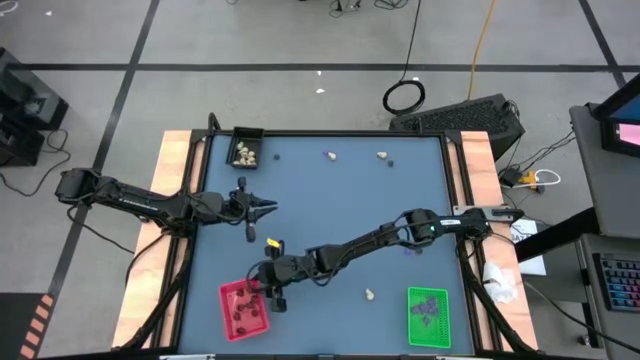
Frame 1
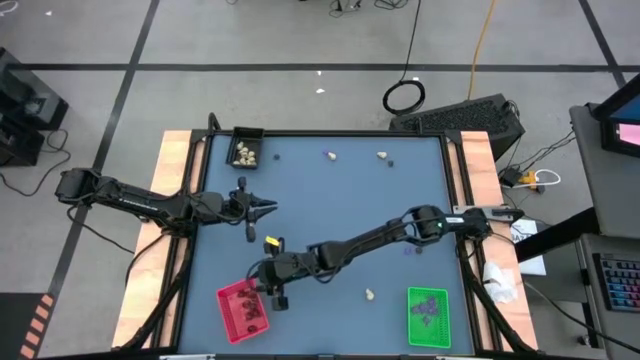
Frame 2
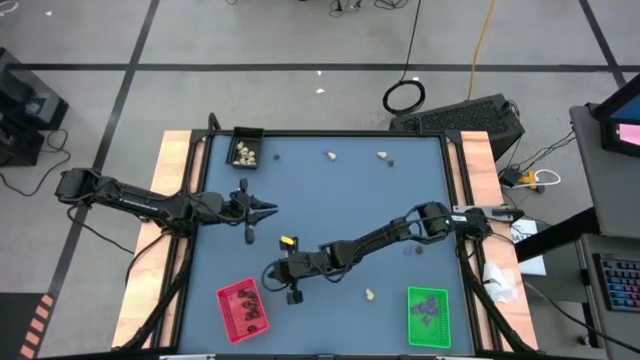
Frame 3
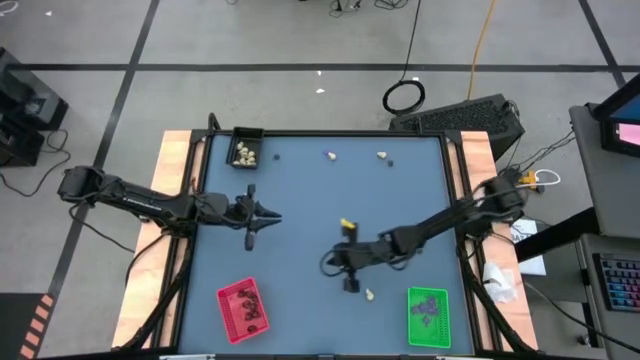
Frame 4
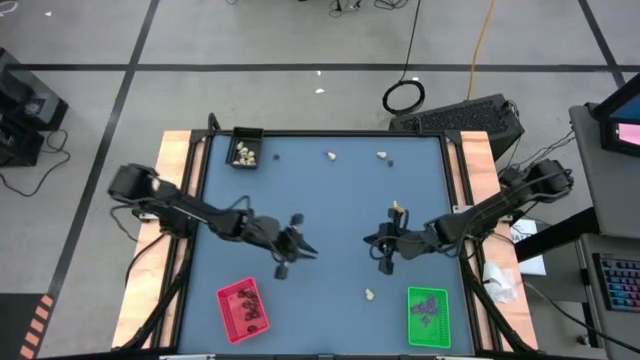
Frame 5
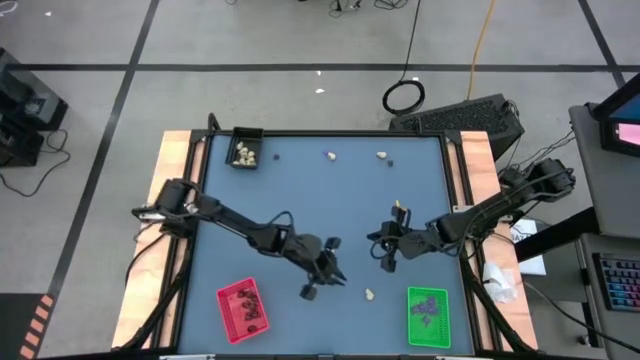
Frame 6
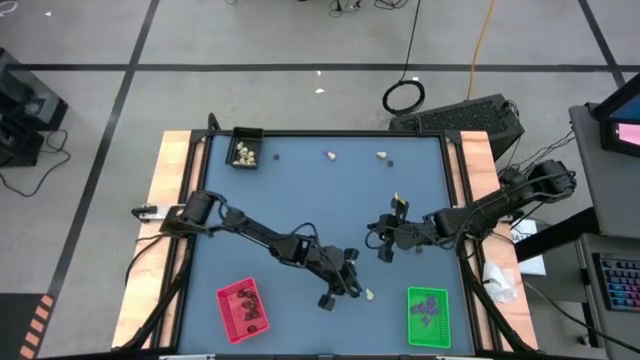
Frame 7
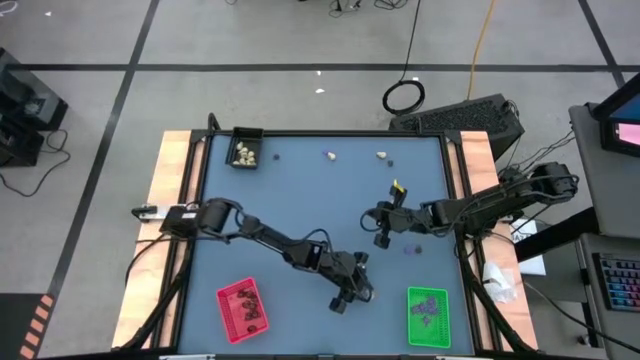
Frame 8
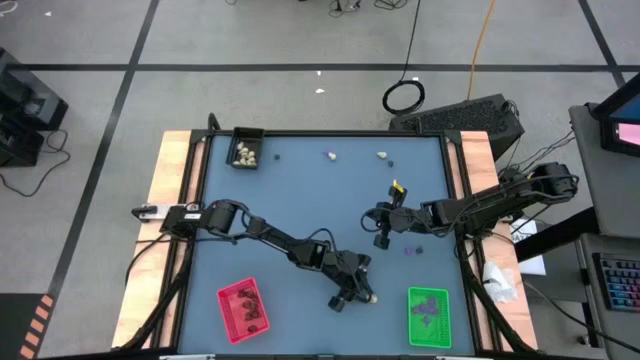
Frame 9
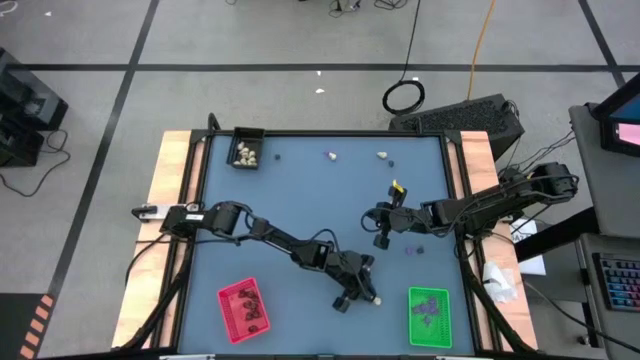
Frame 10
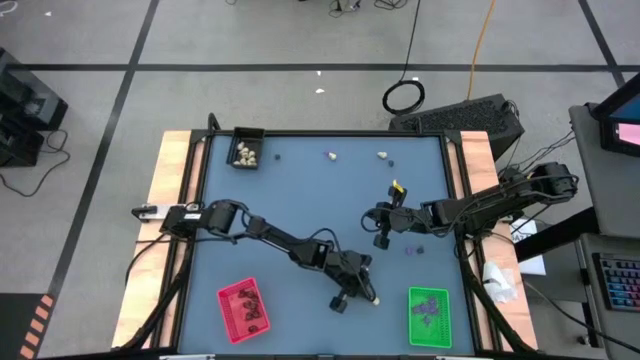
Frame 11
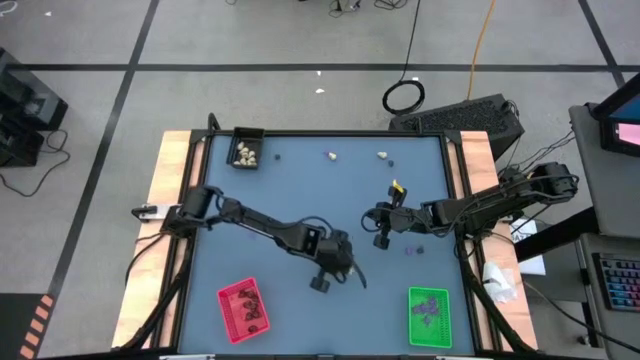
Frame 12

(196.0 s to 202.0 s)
Task: Sort Halloween decoration
Put the white skull toy into the black bin

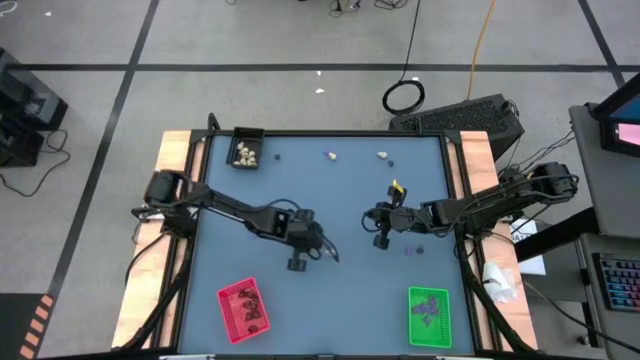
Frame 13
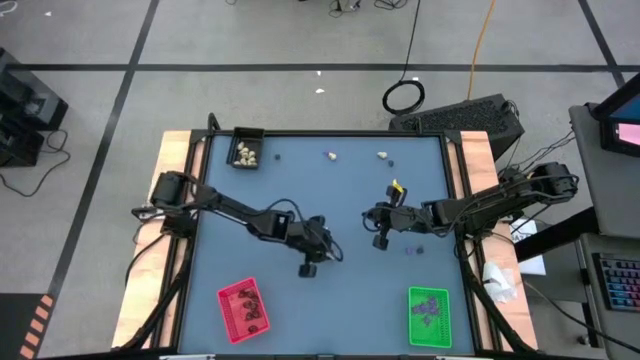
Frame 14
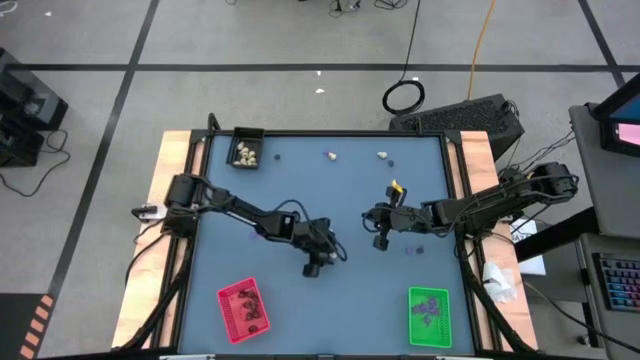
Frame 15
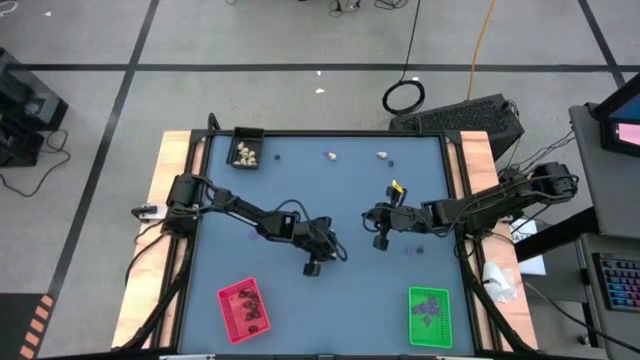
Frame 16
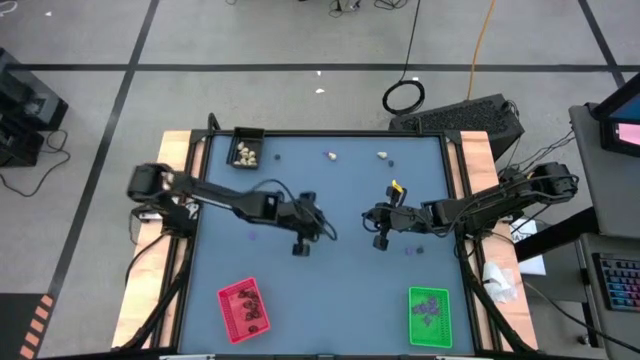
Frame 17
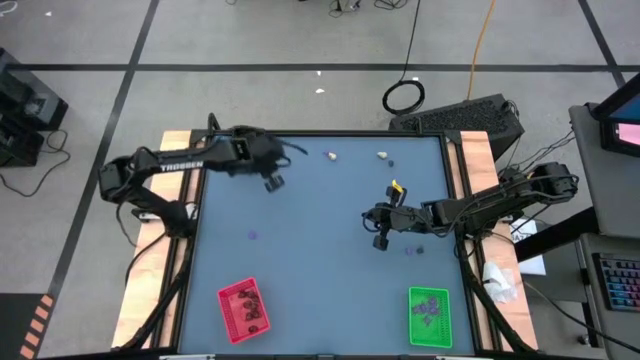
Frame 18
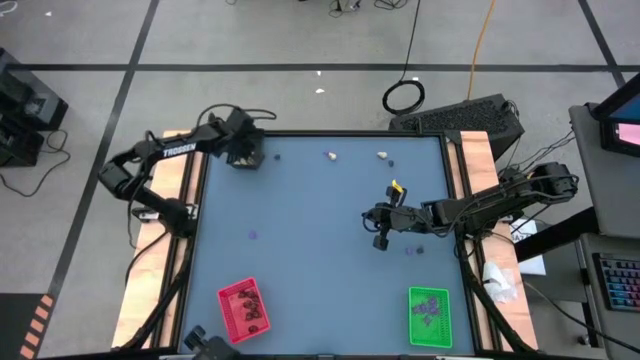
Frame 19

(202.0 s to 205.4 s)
Put the white skull toy into the black bin

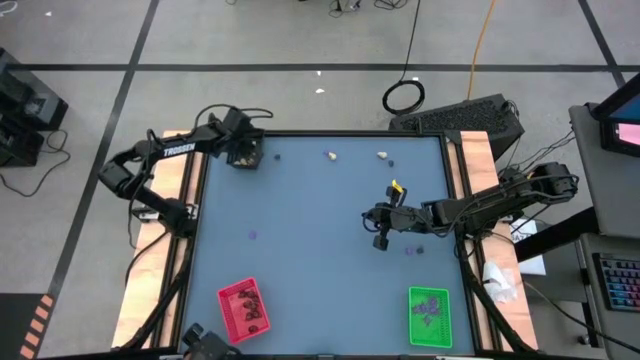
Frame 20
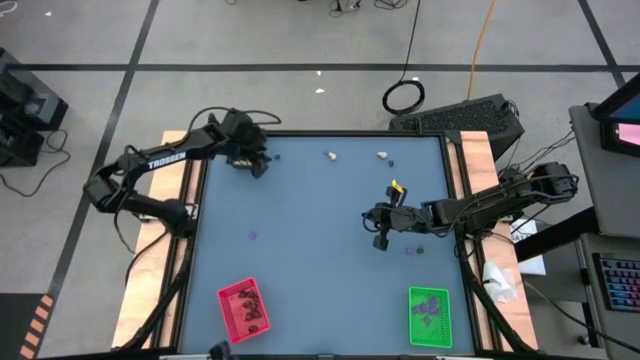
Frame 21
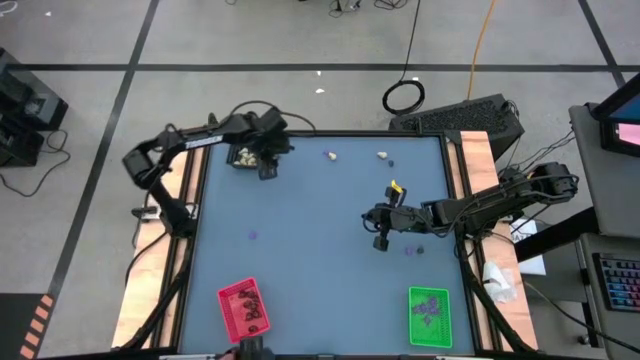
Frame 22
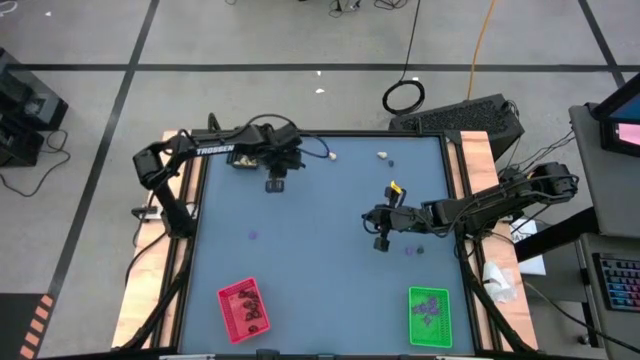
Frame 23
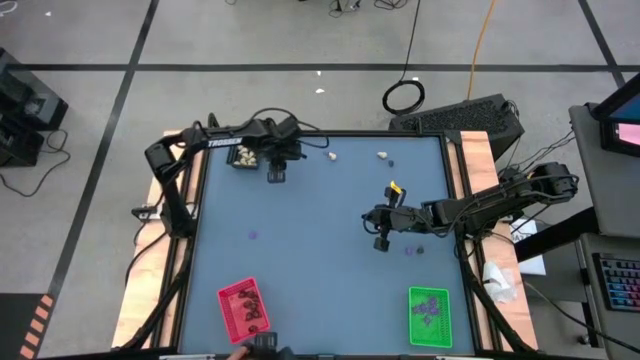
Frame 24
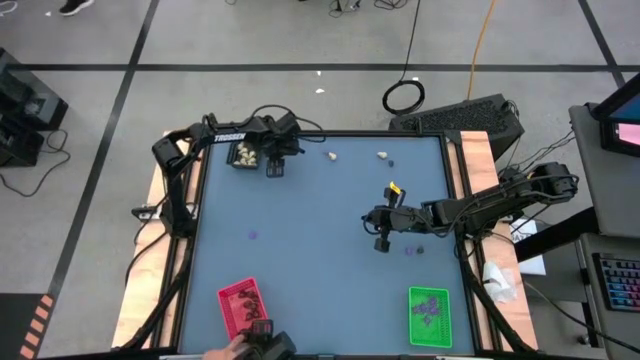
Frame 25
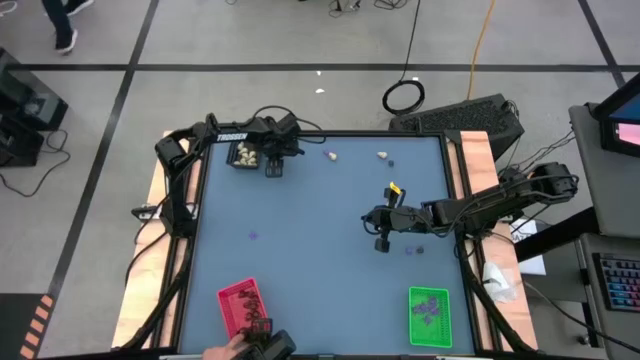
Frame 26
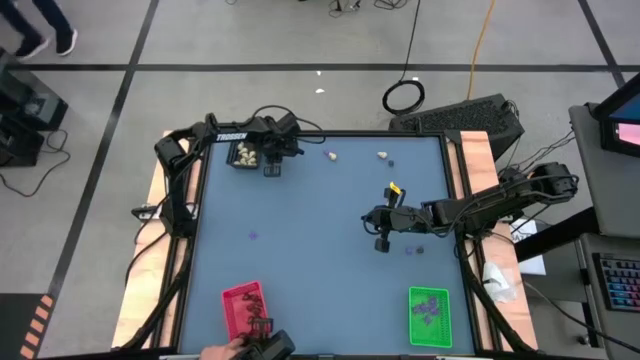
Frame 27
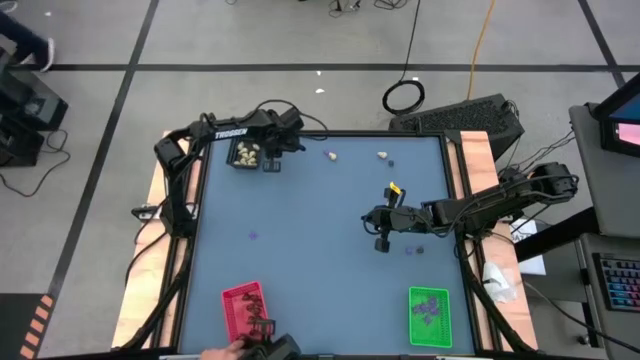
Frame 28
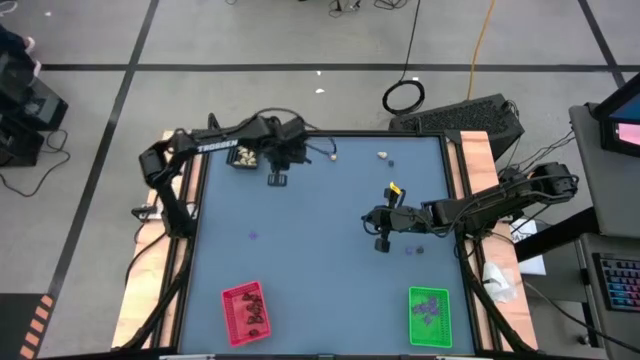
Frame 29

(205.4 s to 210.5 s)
Put the black skull toy into the red bin

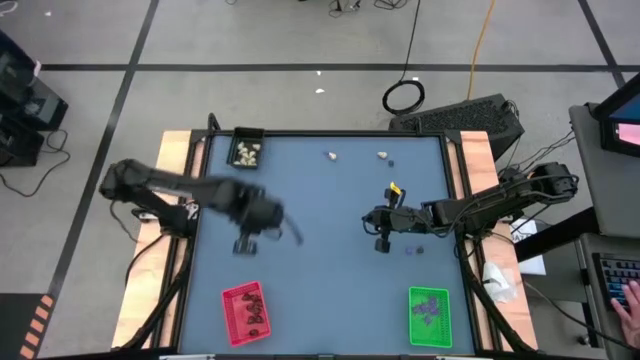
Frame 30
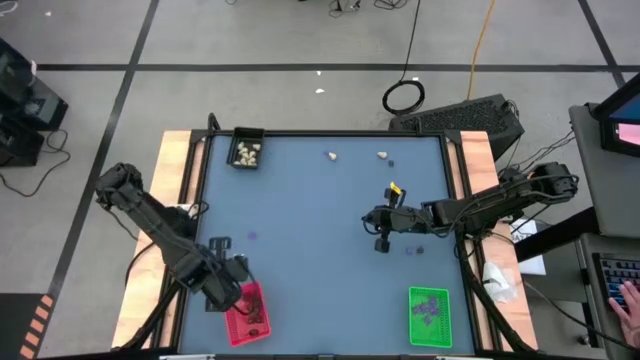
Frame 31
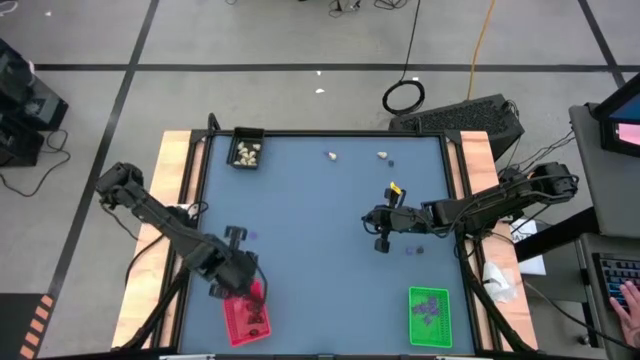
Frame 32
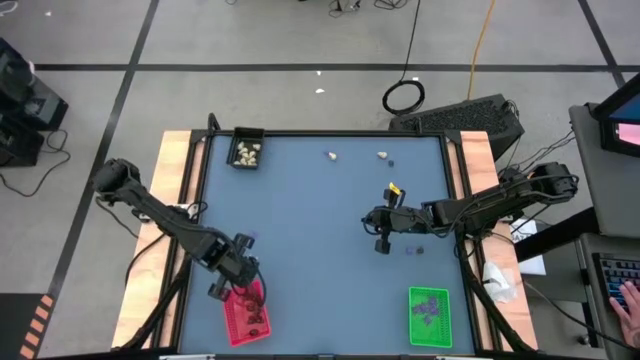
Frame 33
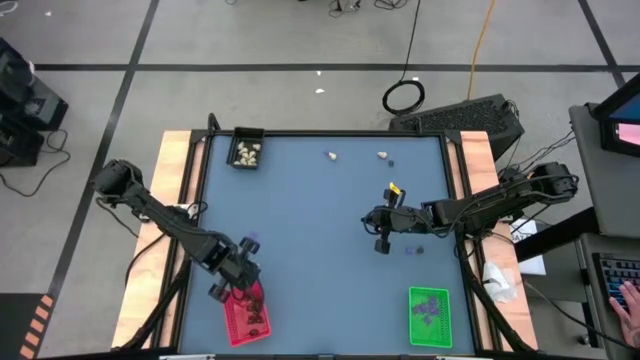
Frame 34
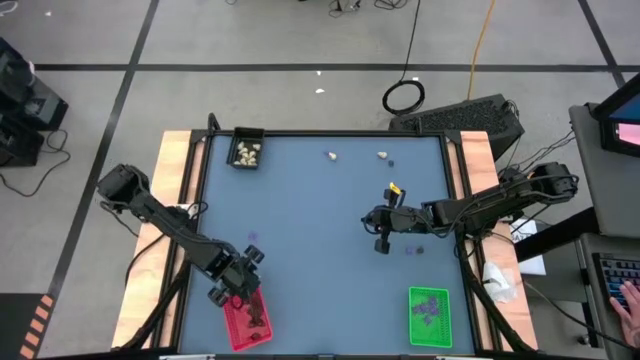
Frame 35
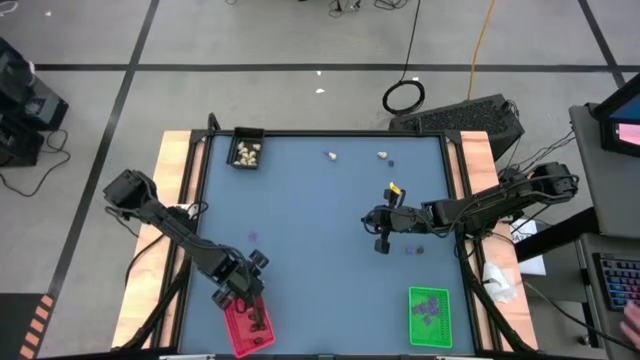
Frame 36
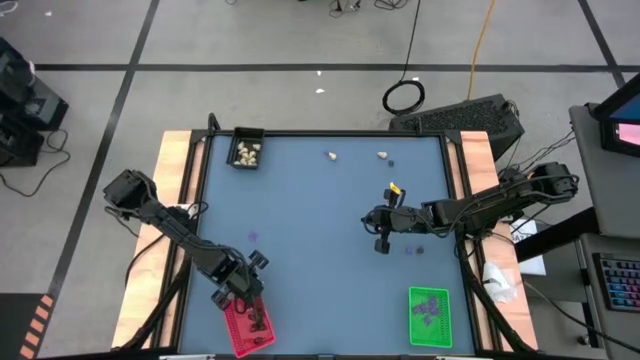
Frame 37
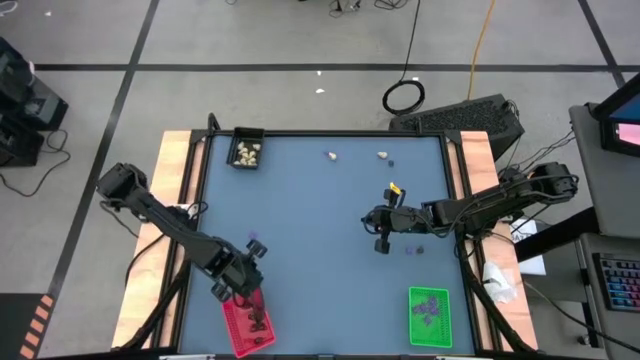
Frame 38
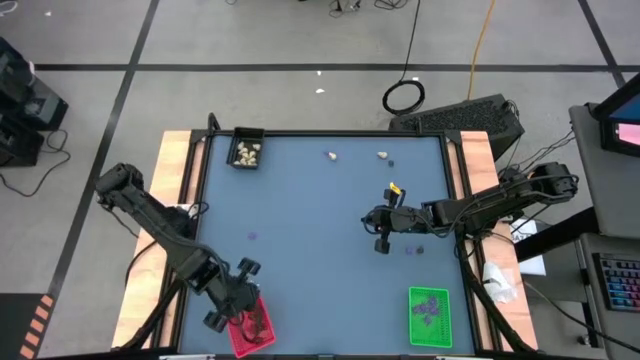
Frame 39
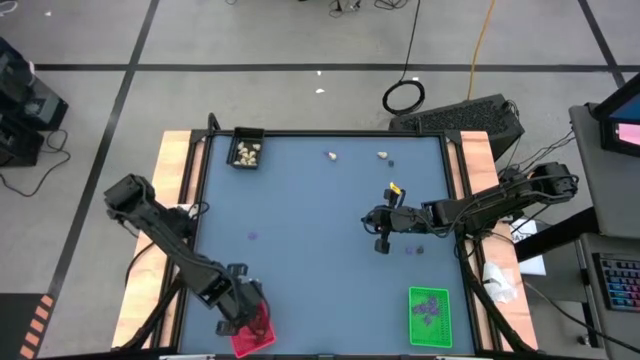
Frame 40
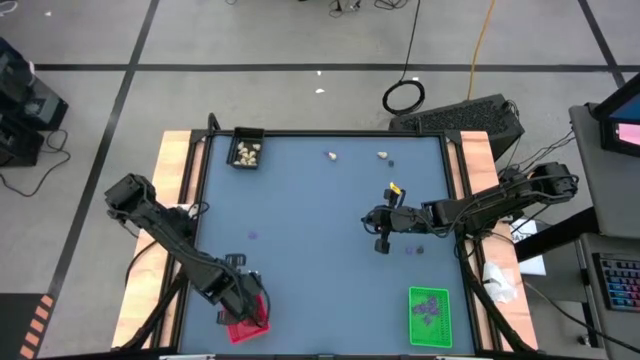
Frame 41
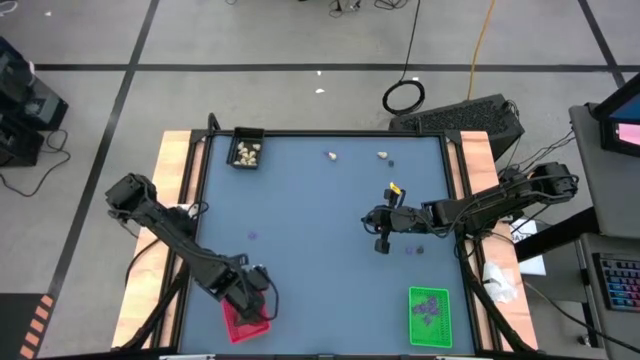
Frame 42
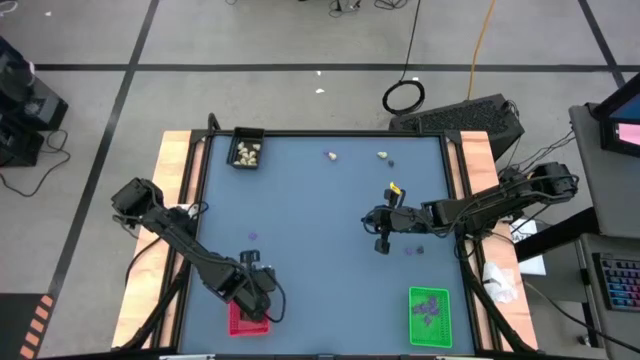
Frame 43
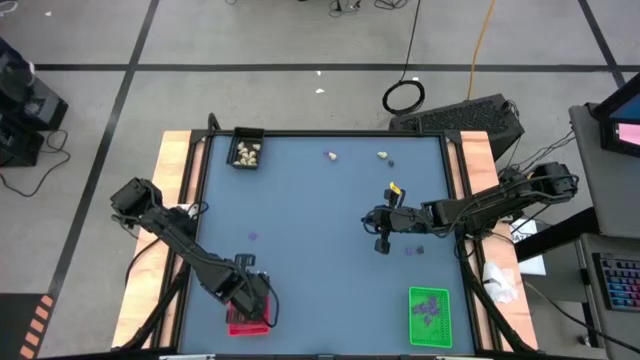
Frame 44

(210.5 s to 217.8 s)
Put the black skull toy into the red bin
